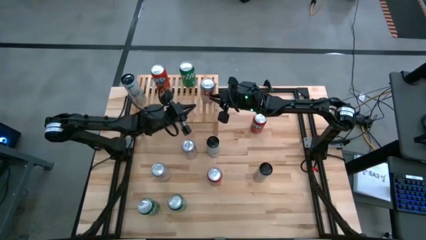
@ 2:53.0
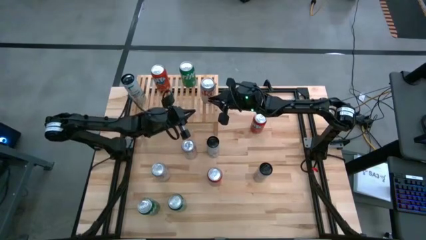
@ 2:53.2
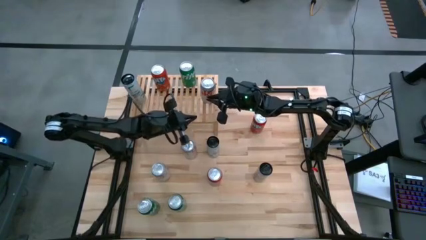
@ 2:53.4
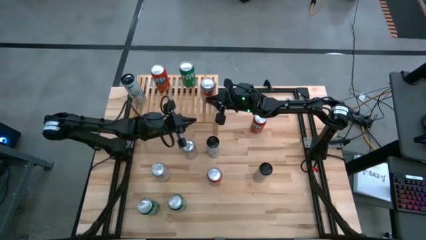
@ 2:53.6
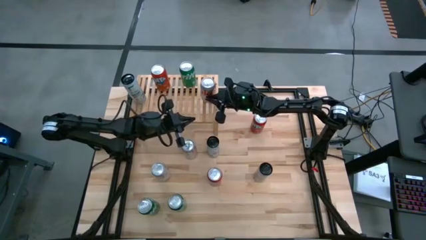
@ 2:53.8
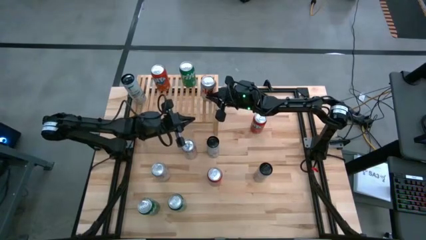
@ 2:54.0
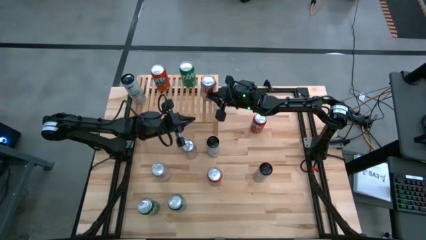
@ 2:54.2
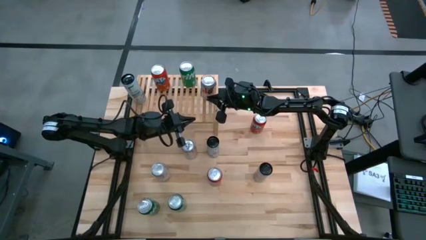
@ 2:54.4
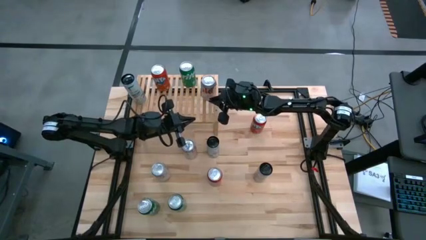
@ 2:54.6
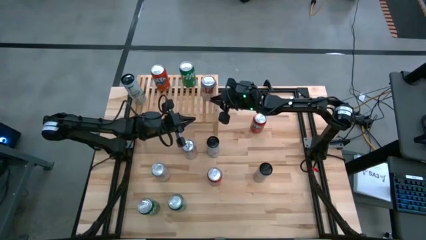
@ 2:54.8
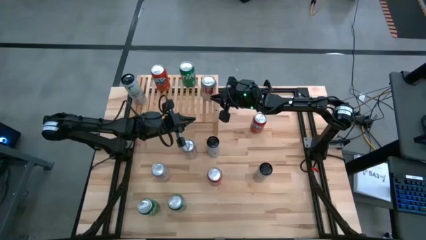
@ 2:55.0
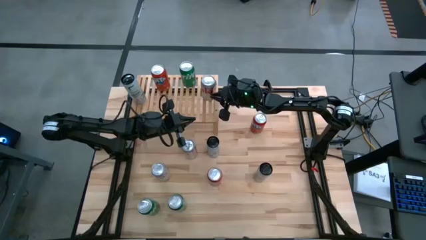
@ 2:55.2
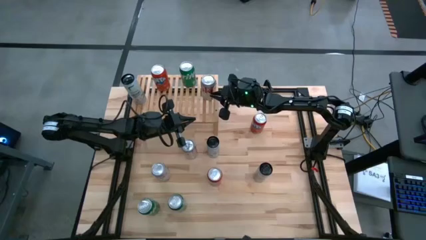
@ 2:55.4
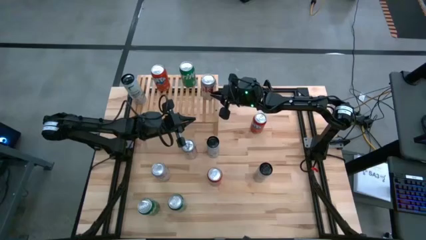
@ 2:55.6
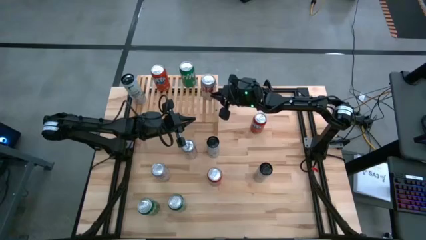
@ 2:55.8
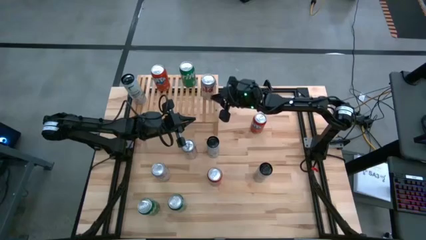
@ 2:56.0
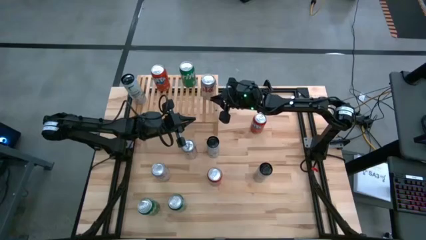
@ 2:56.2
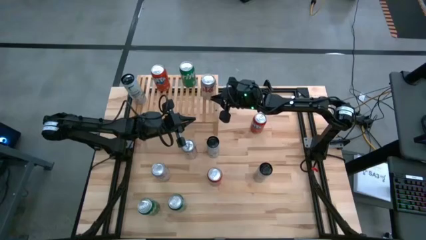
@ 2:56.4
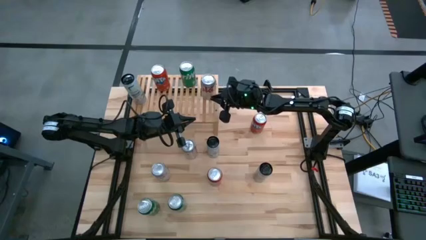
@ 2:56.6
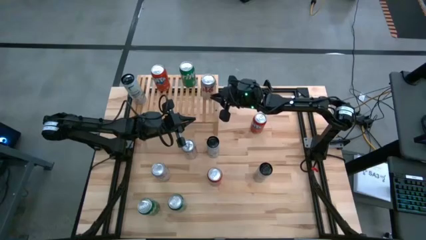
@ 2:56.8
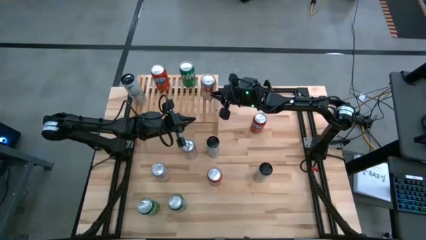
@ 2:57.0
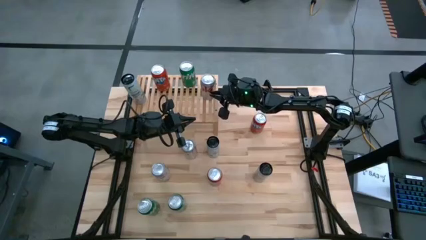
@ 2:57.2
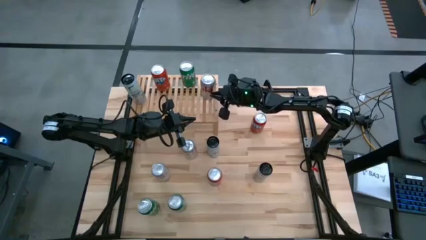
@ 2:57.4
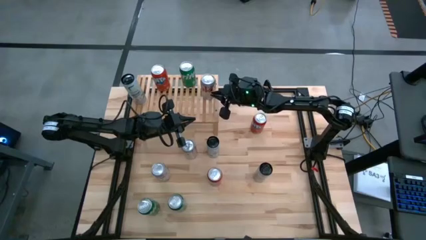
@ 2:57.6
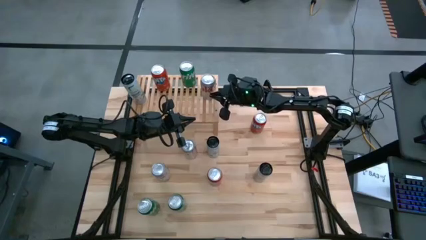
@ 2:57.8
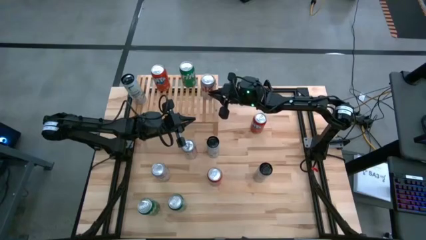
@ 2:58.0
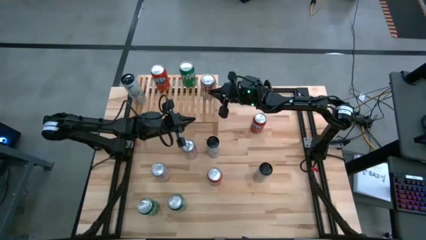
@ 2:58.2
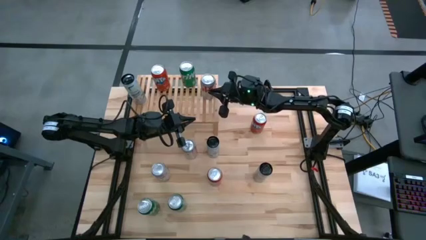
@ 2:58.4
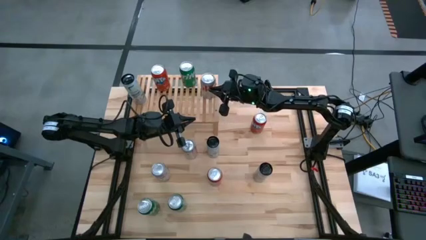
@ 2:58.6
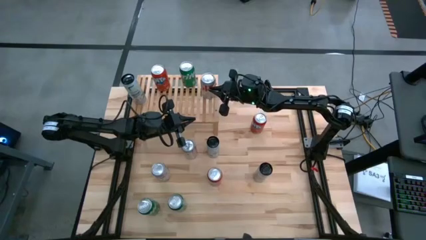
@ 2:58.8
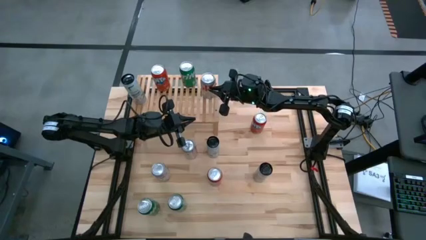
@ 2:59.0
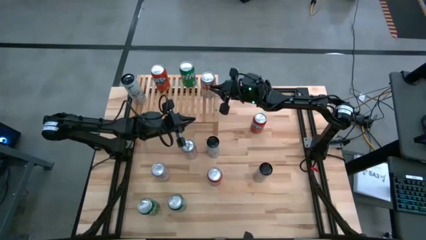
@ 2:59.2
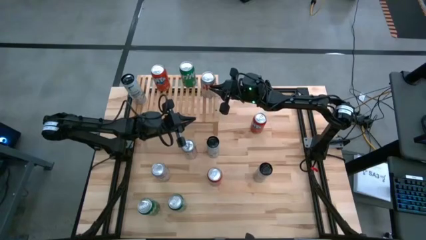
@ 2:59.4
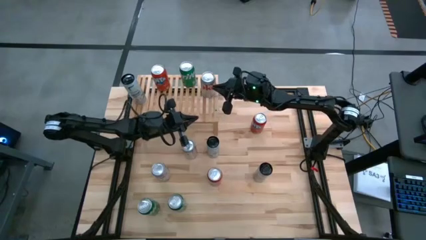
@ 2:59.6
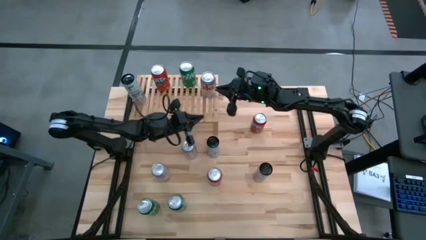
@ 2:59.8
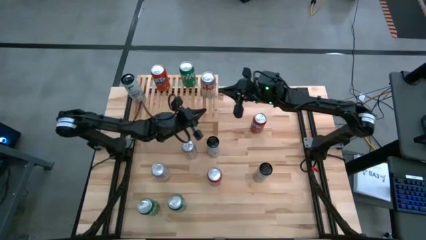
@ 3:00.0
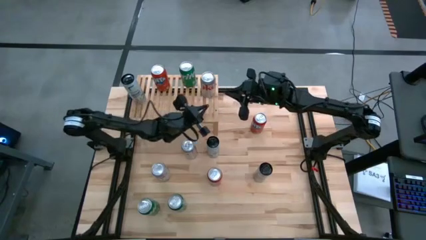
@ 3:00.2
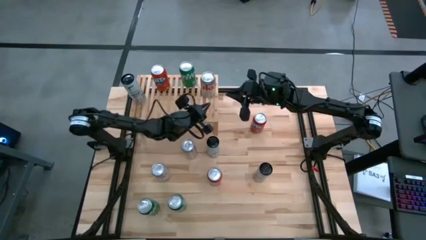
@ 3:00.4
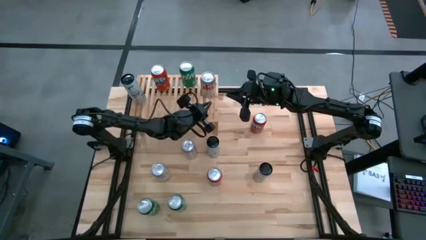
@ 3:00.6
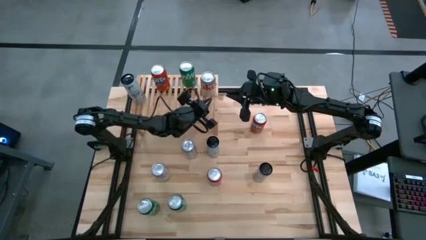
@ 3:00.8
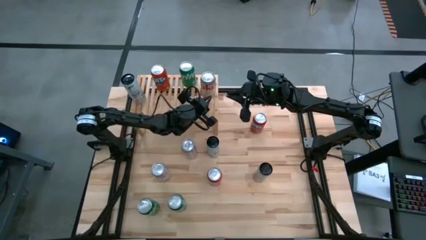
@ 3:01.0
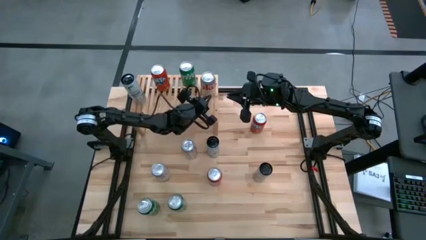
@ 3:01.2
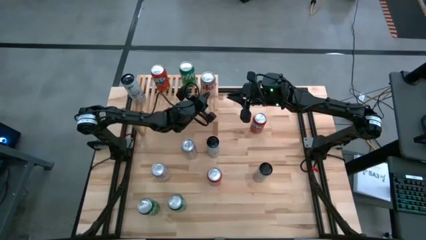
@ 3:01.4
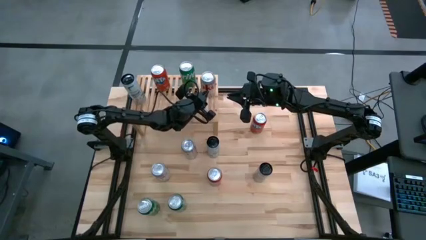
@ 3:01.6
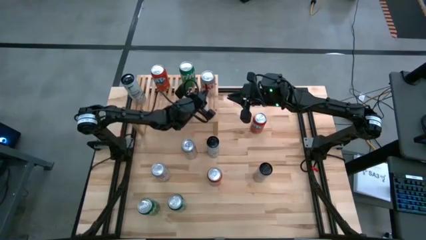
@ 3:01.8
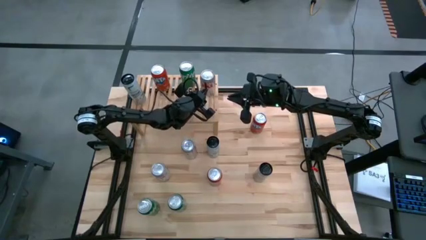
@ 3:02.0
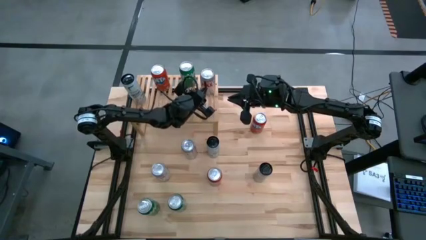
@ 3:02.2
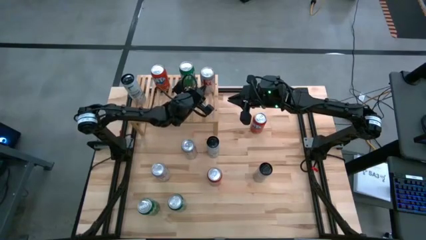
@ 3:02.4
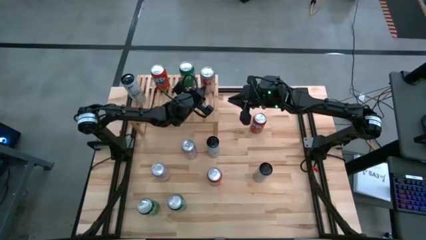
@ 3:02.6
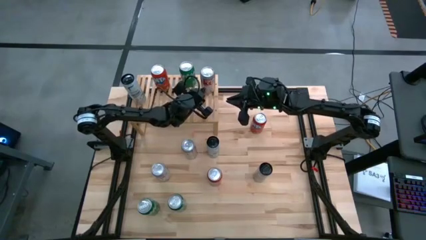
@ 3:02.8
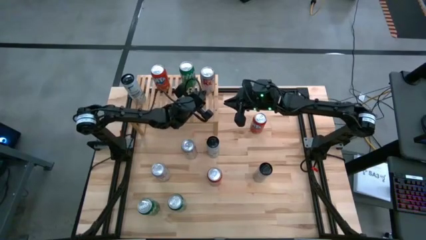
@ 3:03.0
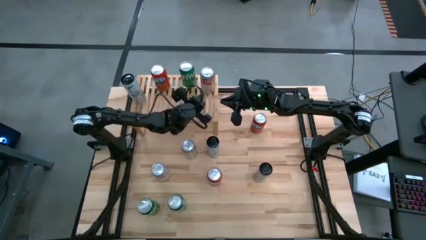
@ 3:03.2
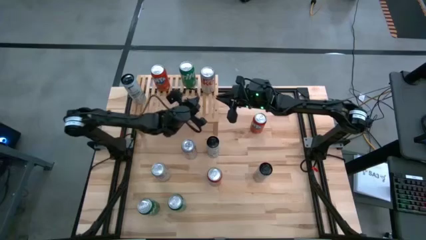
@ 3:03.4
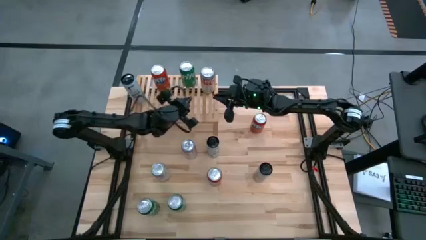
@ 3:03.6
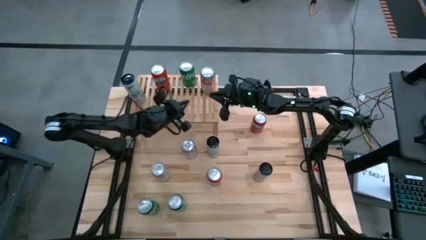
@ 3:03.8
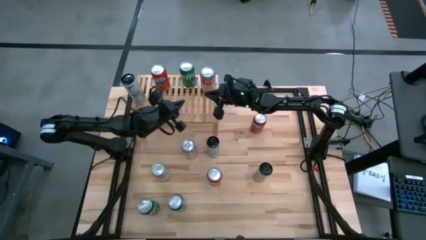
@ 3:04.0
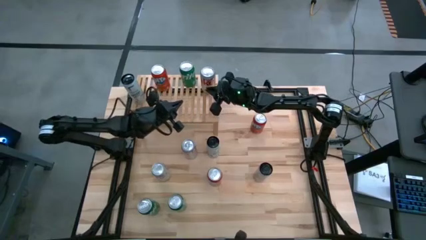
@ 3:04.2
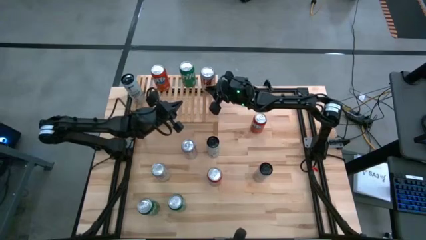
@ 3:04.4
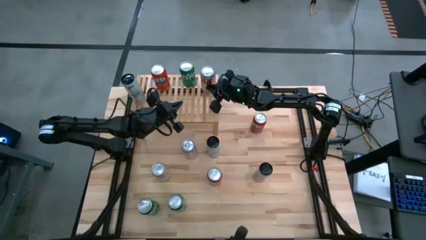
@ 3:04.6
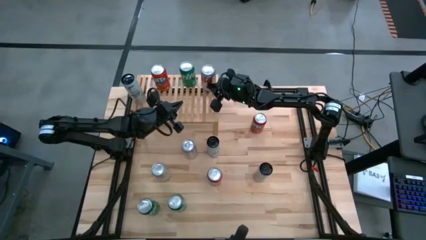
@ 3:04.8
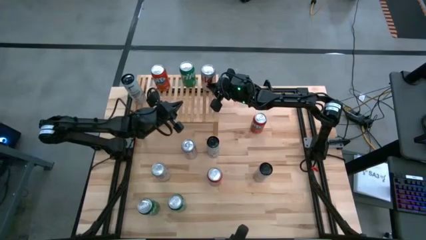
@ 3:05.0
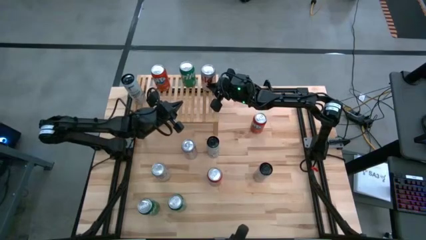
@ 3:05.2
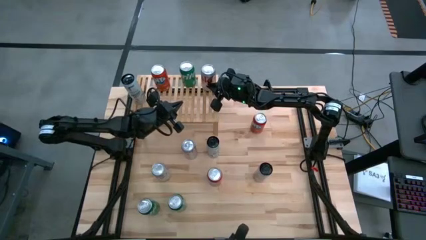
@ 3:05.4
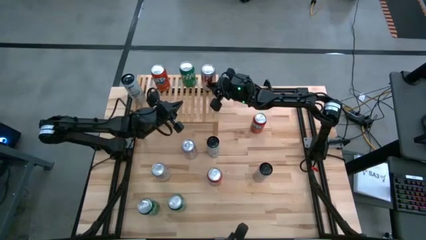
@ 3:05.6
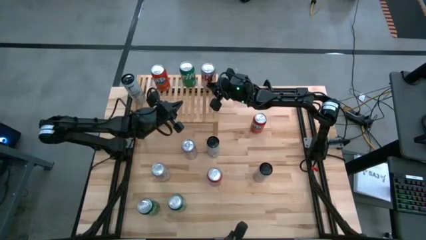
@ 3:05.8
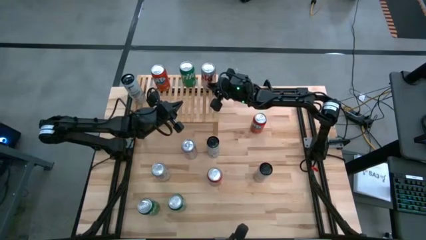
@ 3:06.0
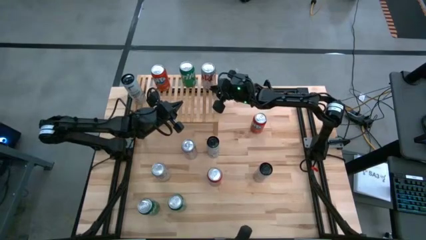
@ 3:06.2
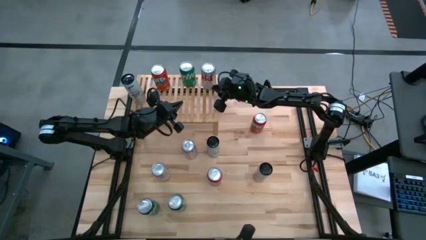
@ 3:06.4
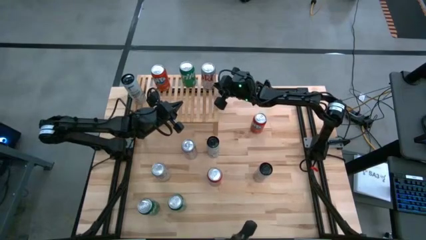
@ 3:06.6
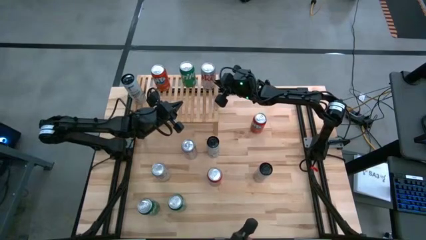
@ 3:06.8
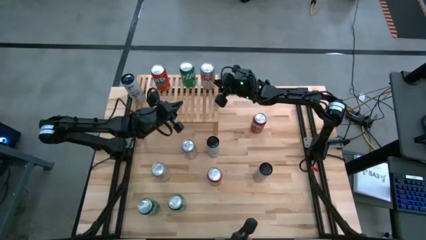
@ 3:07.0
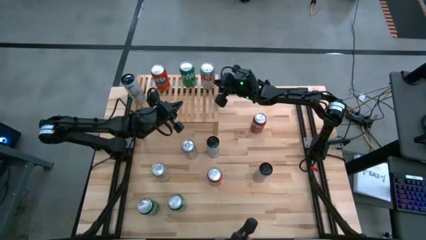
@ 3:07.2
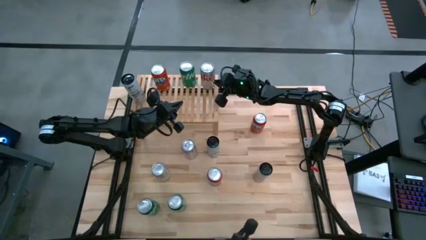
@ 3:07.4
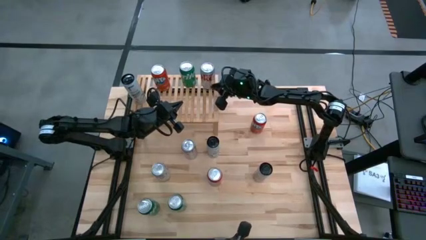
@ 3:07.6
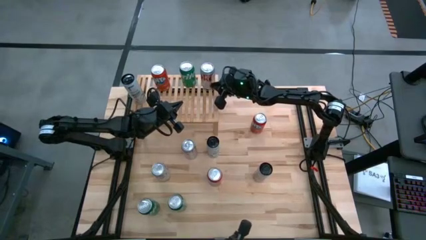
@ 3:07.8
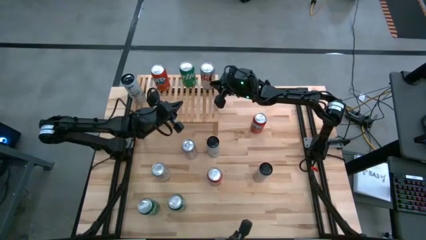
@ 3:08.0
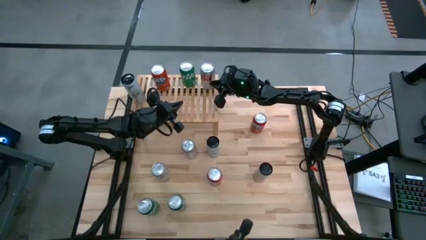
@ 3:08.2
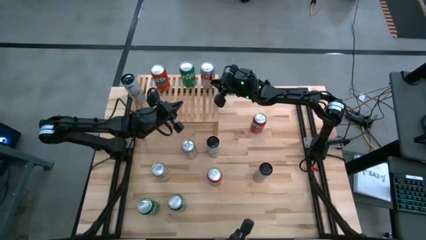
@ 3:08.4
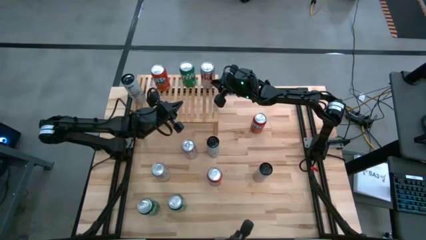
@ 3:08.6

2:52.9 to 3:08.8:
Task: Place canned beverage on shelf
Put the bottom red/silver soda can on the shelf
